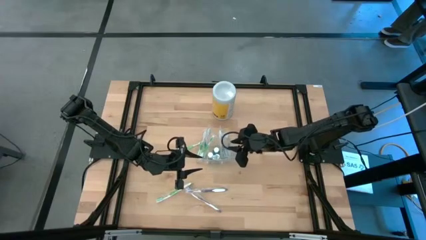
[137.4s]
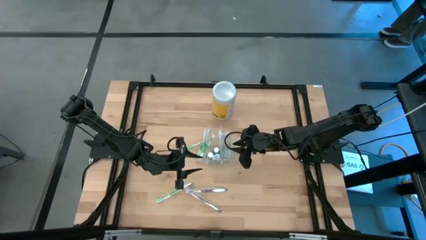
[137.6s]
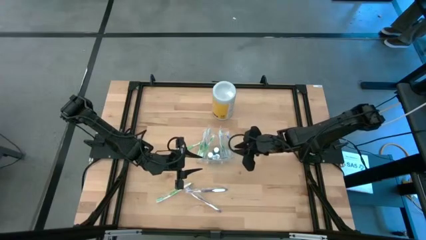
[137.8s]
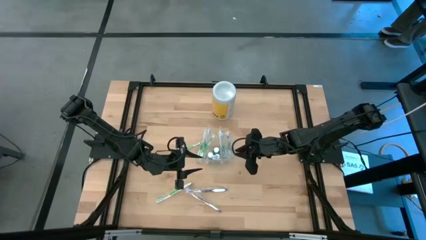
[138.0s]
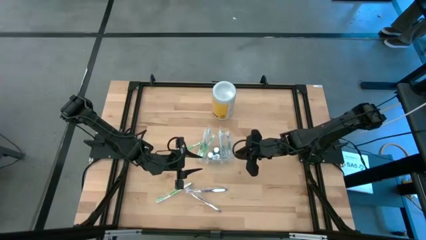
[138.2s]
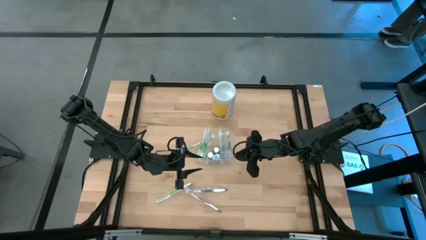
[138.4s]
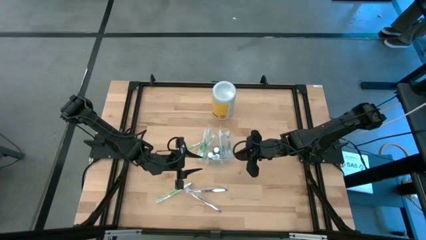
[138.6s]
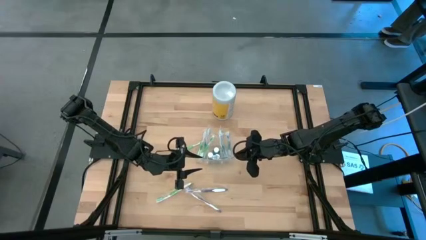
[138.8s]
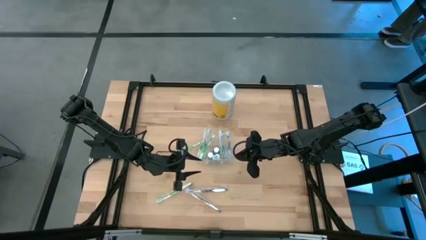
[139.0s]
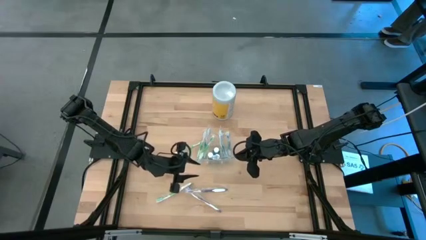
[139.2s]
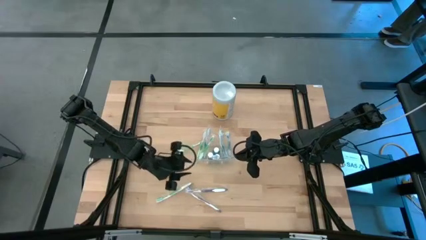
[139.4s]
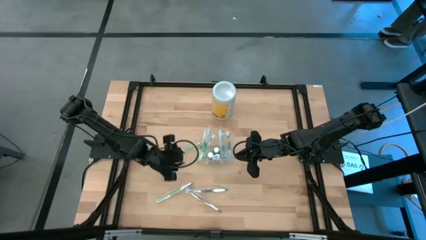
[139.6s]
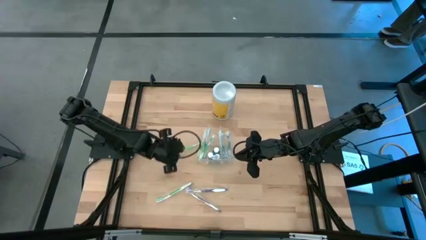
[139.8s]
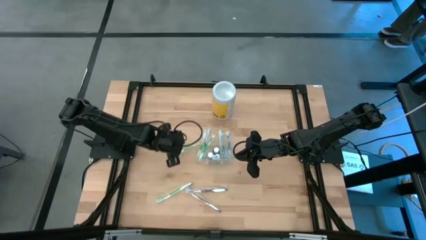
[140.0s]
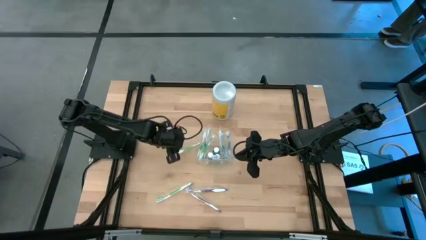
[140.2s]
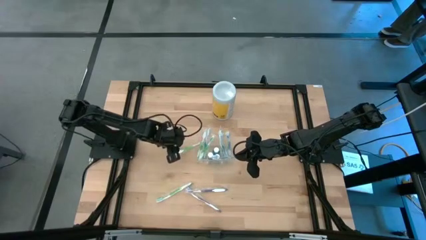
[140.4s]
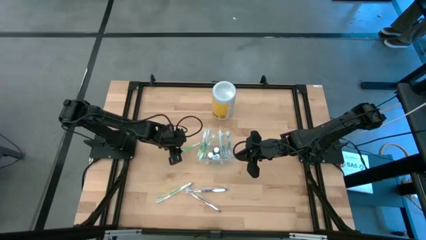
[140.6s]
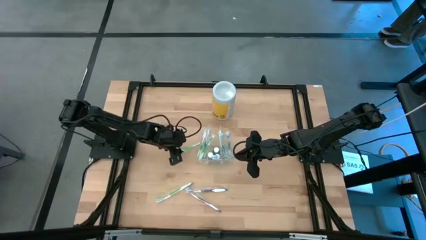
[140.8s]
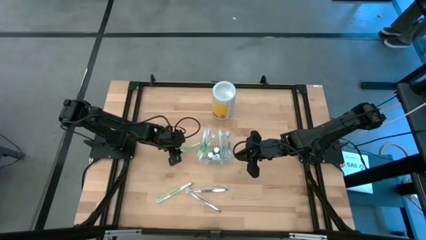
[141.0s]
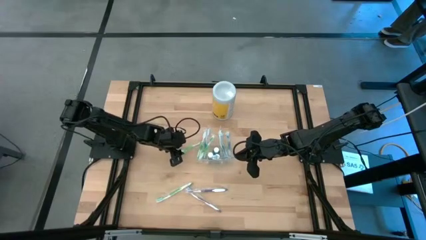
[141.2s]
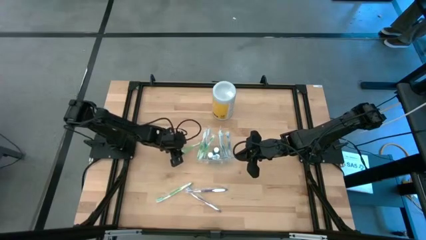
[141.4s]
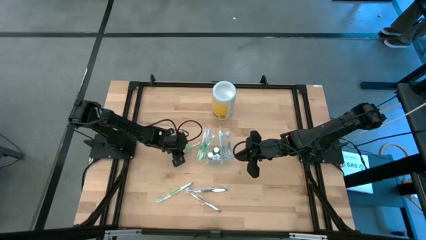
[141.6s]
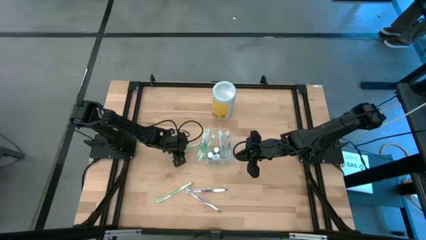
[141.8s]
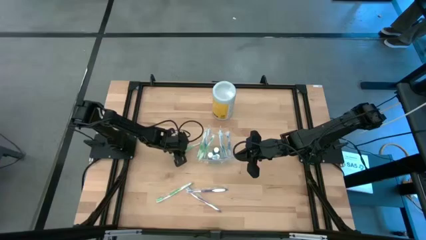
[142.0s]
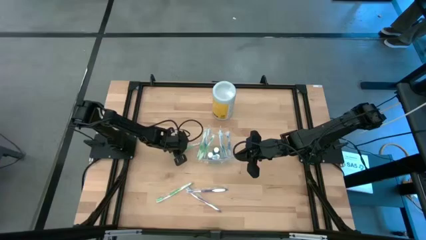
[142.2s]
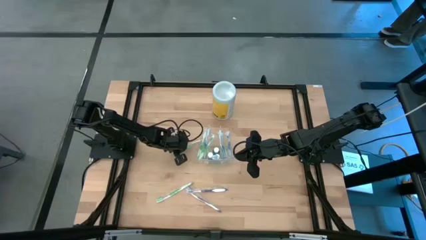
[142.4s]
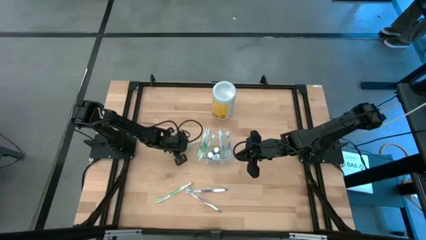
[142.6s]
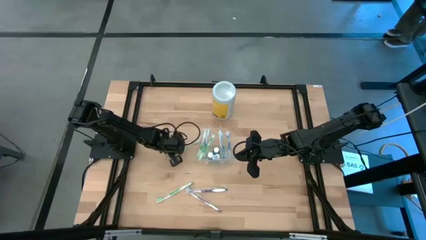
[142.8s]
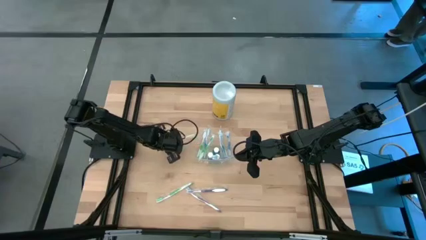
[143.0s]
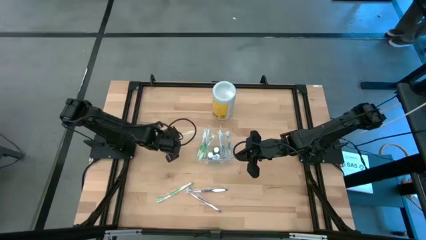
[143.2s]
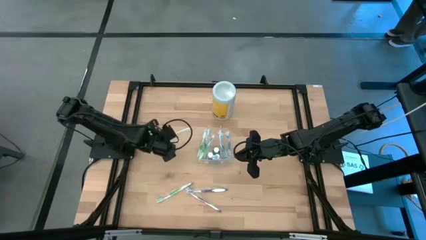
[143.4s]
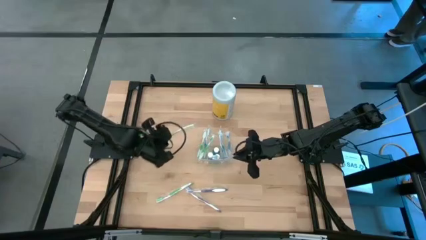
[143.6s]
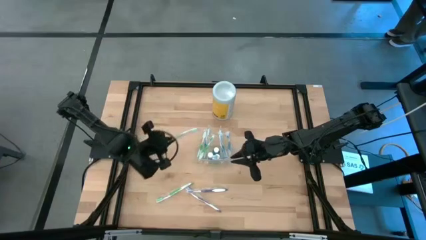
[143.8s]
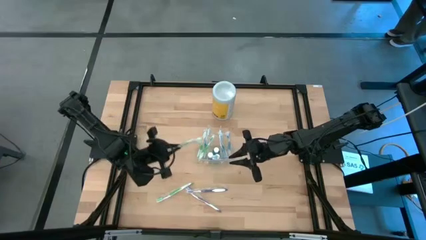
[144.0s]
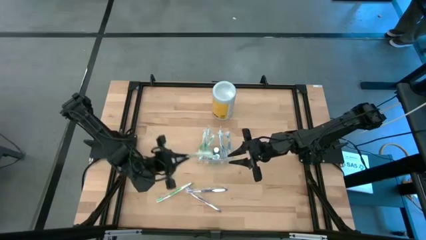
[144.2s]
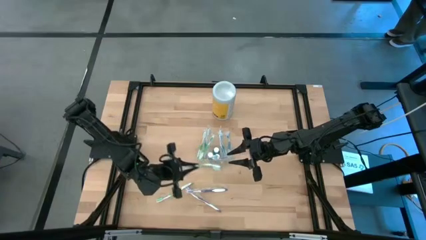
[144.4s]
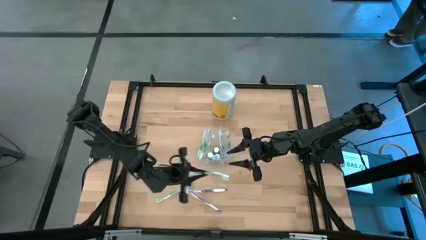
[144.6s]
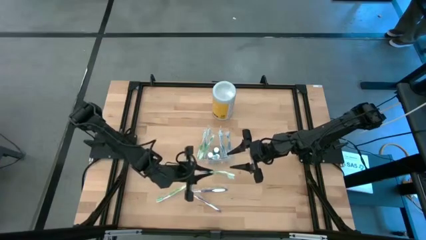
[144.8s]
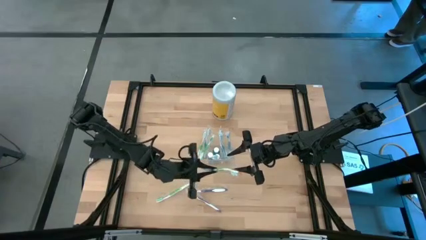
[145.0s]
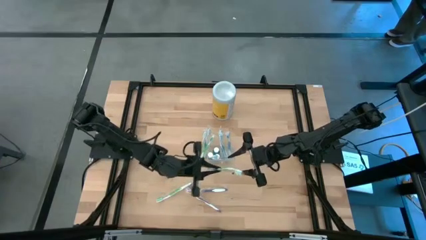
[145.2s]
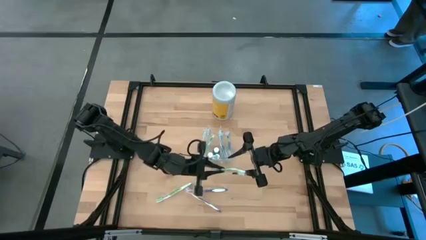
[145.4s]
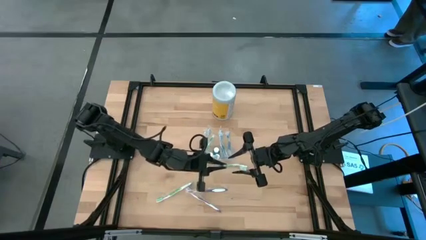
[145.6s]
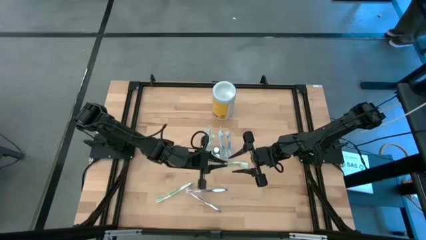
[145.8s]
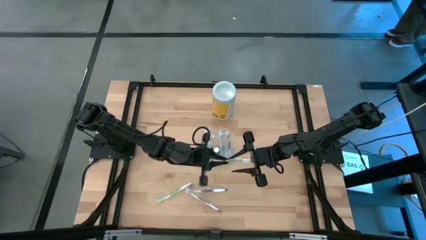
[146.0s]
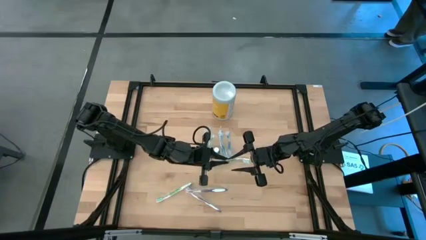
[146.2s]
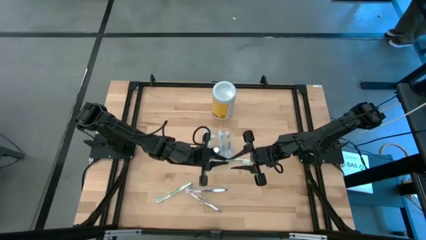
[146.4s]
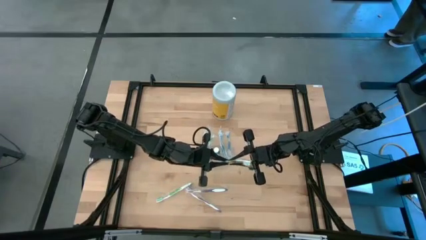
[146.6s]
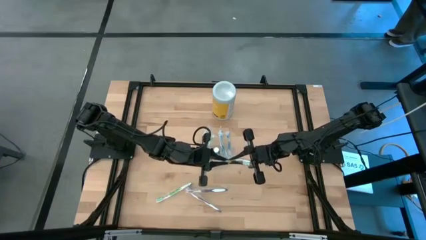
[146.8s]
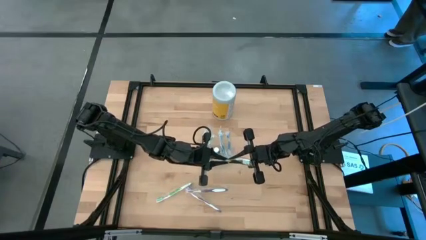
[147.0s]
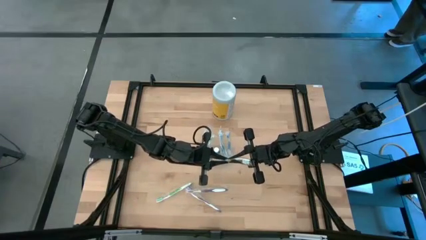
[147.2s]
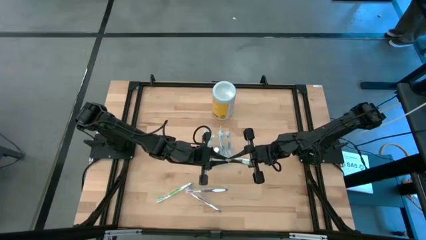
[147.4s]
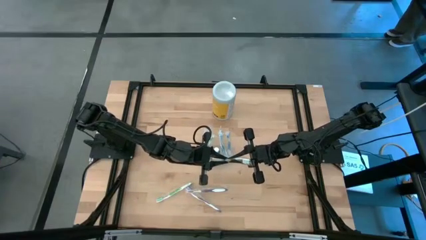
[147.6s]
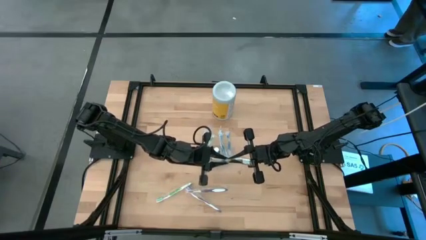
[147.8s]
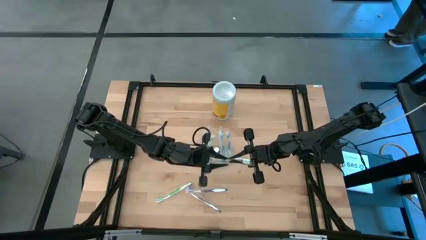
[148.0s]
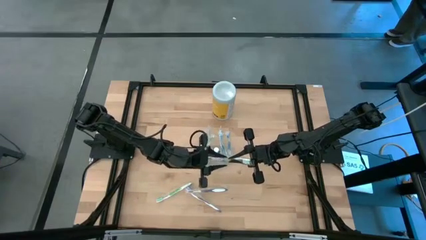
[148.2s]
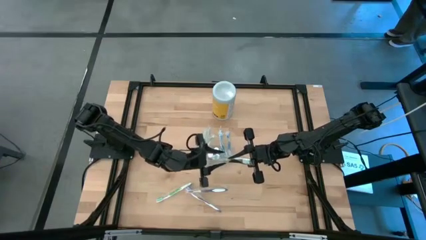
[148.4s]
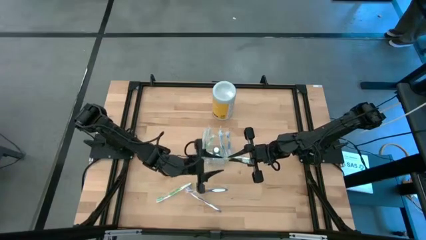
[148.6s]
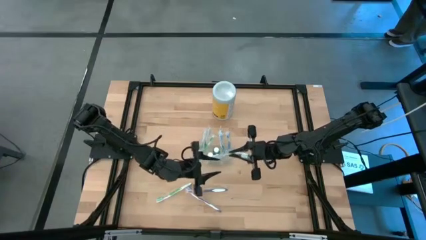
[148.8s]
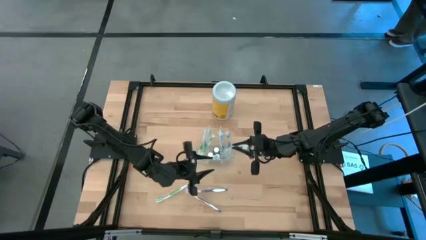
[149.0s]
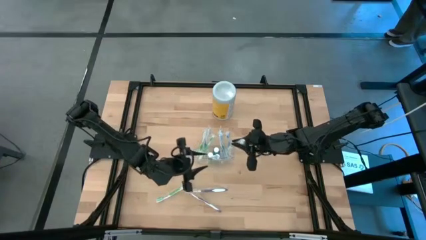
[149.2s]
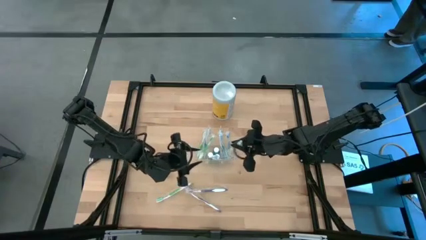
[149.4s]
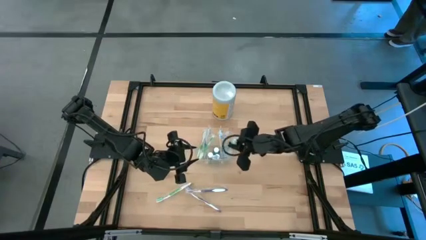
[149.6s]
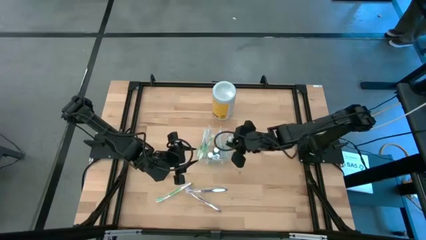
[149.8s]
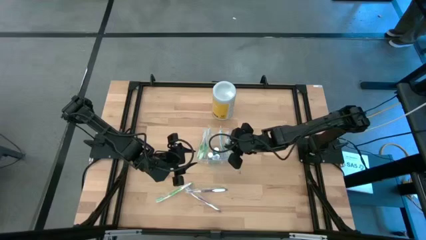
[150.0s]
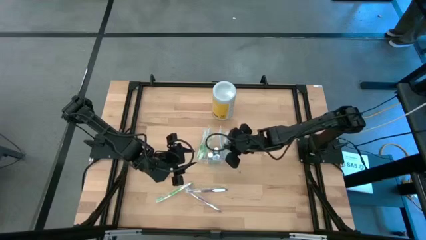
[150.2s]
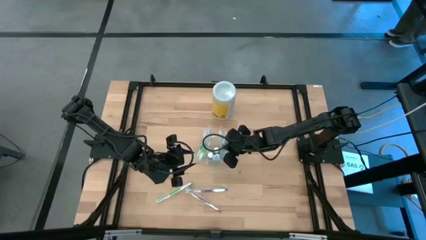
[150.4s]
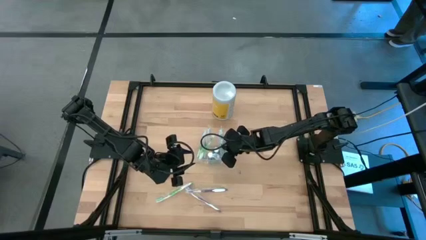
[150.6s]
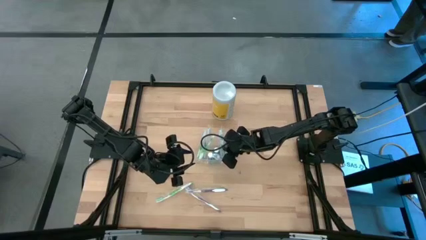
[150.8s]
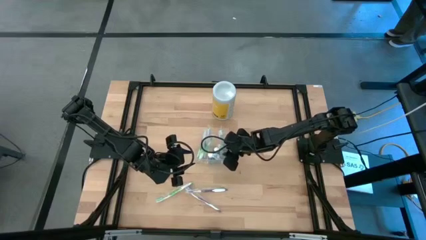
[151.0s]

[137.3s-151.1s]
Task: Pick & Place toothbrushing station
Put the green toothbrush into the transparent organizer
